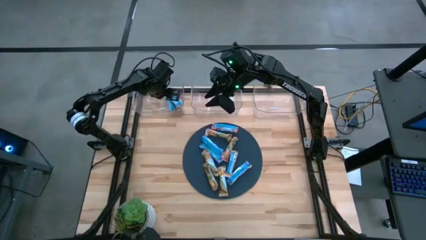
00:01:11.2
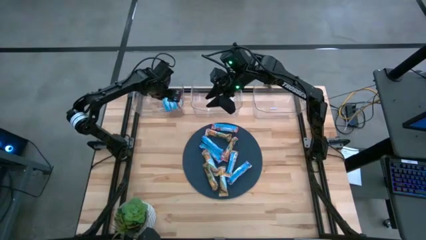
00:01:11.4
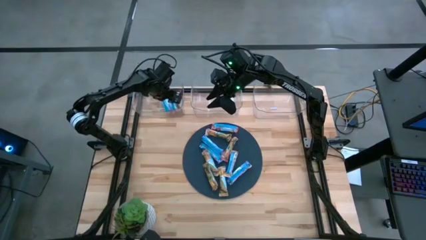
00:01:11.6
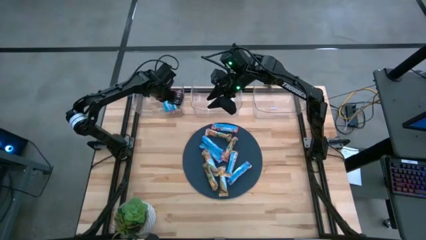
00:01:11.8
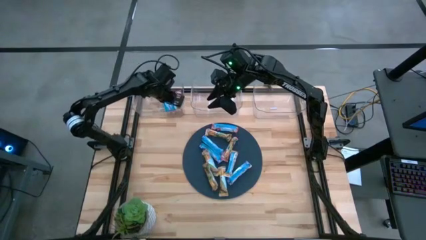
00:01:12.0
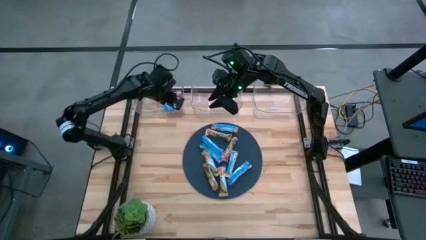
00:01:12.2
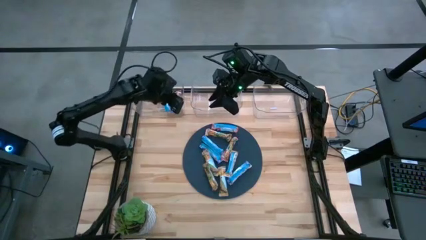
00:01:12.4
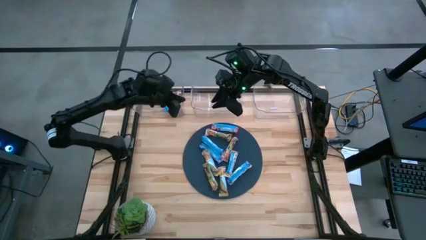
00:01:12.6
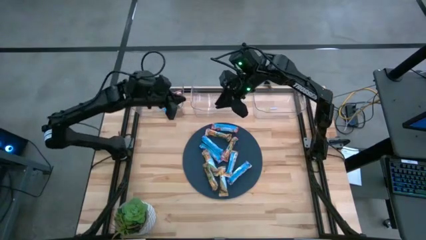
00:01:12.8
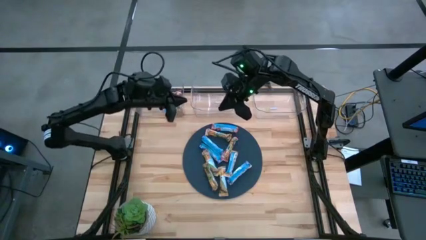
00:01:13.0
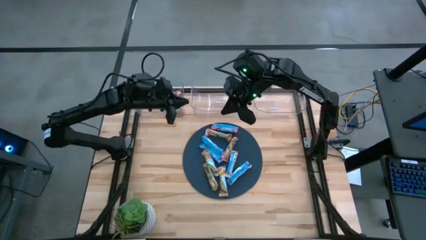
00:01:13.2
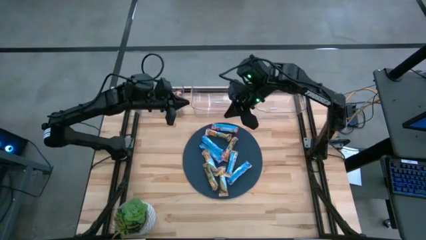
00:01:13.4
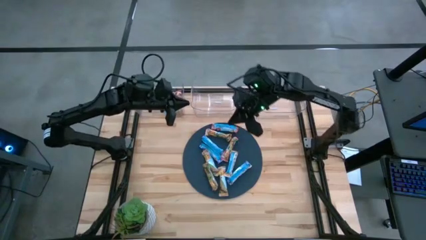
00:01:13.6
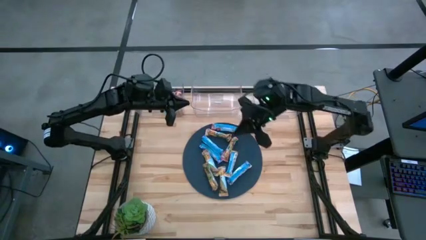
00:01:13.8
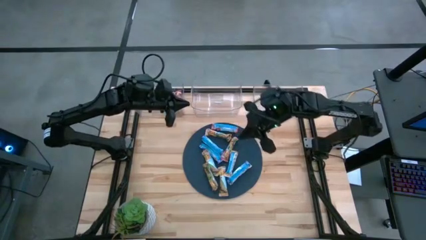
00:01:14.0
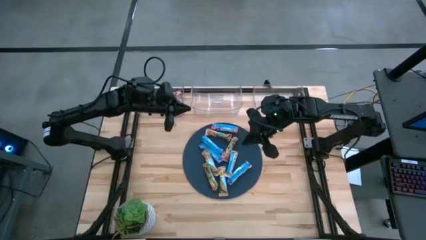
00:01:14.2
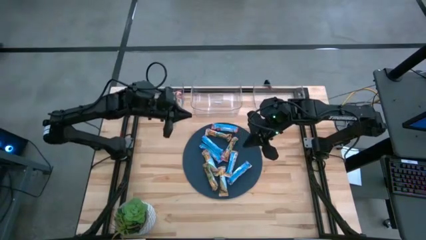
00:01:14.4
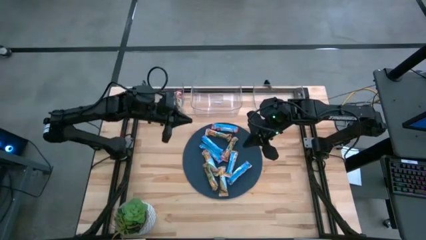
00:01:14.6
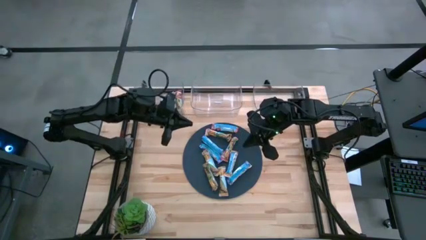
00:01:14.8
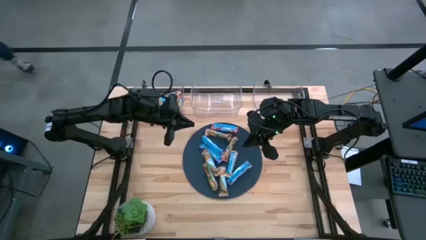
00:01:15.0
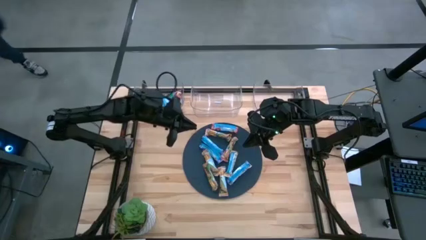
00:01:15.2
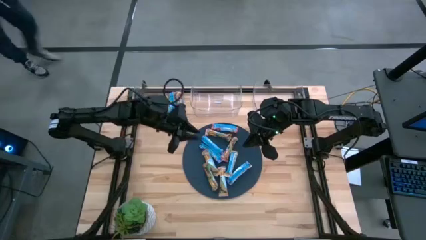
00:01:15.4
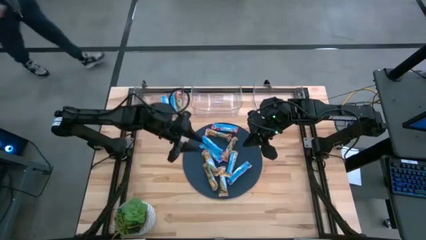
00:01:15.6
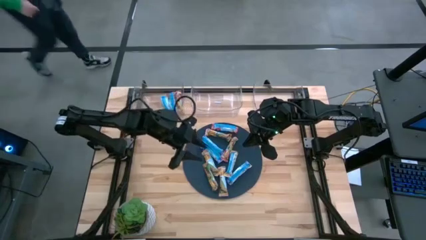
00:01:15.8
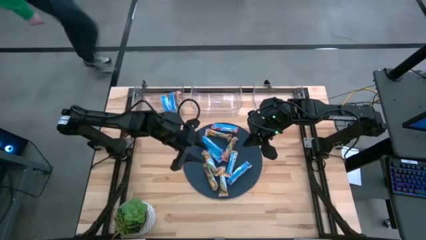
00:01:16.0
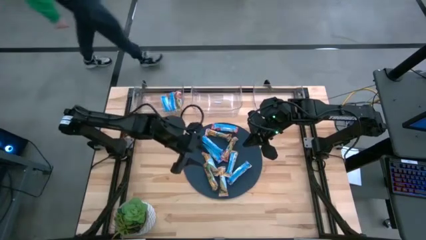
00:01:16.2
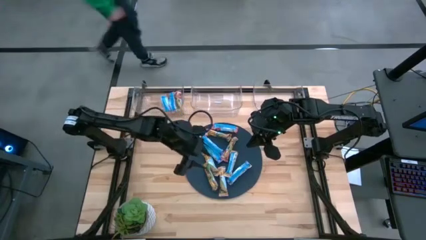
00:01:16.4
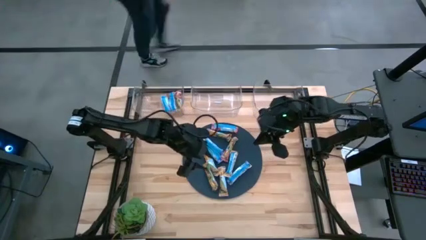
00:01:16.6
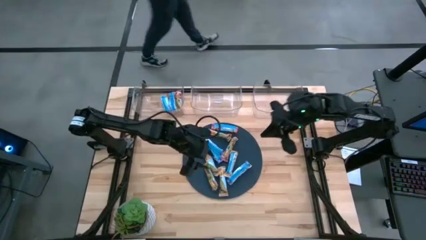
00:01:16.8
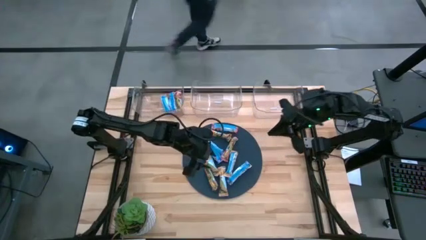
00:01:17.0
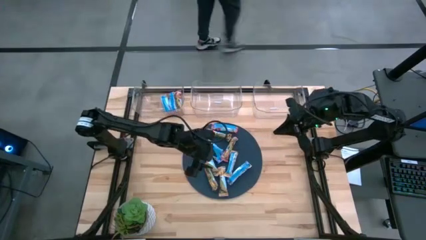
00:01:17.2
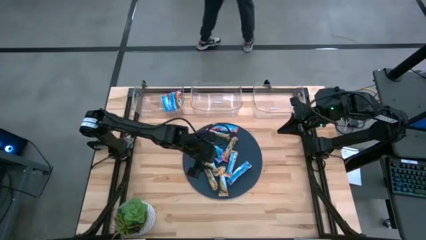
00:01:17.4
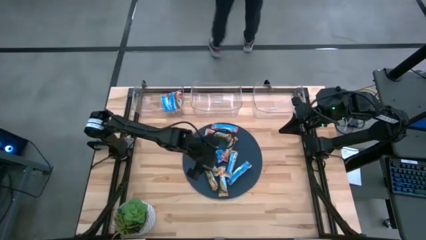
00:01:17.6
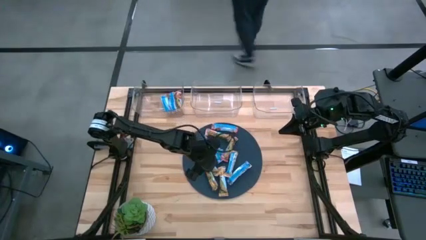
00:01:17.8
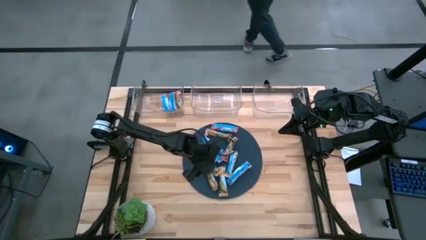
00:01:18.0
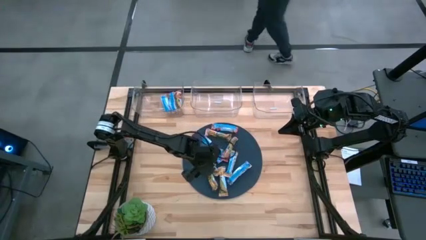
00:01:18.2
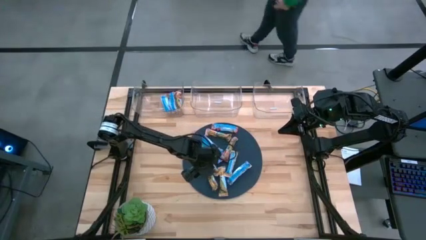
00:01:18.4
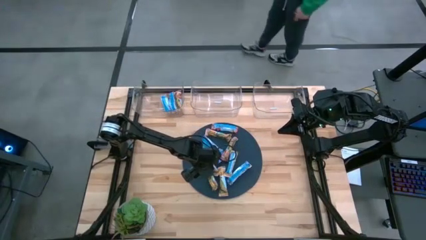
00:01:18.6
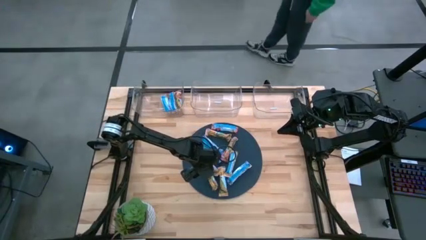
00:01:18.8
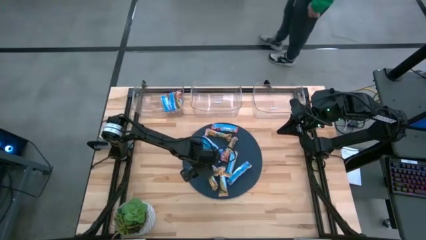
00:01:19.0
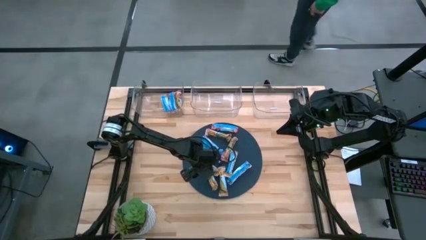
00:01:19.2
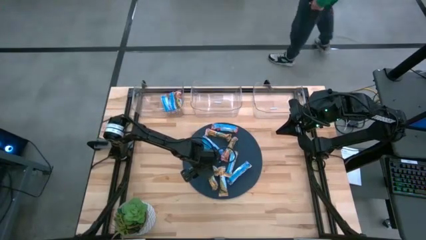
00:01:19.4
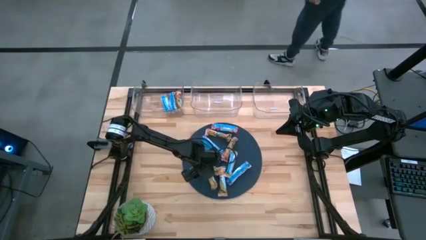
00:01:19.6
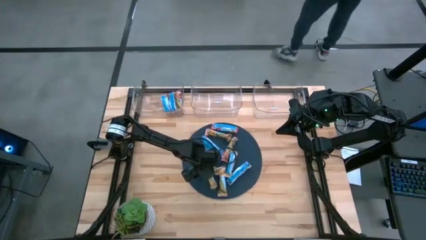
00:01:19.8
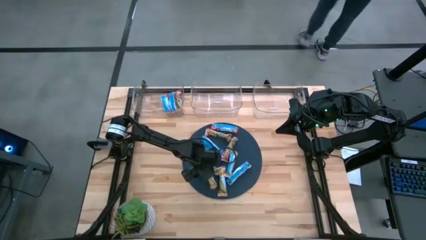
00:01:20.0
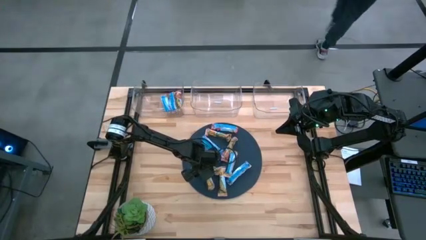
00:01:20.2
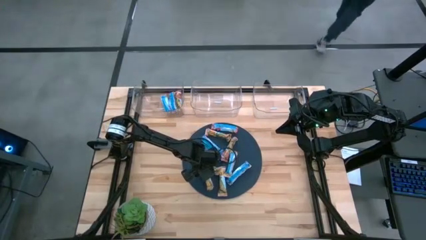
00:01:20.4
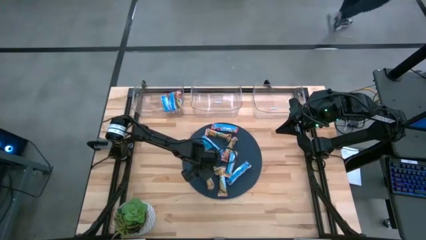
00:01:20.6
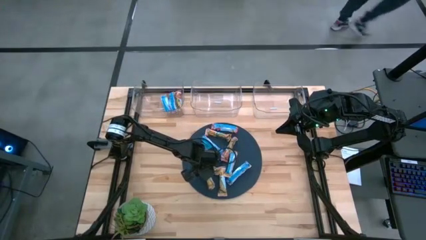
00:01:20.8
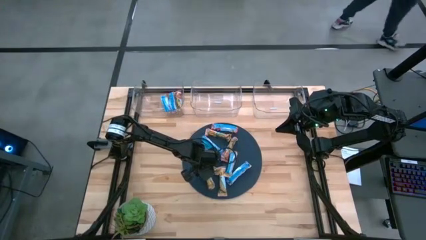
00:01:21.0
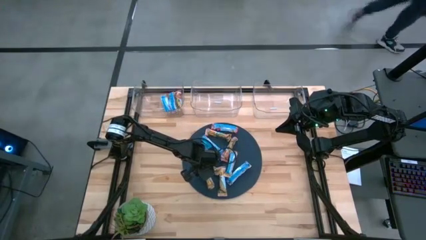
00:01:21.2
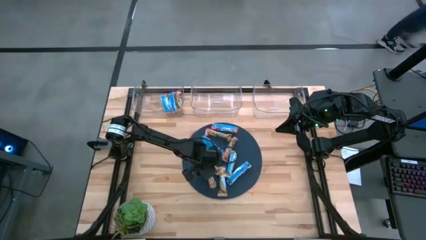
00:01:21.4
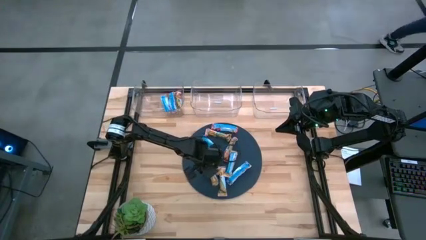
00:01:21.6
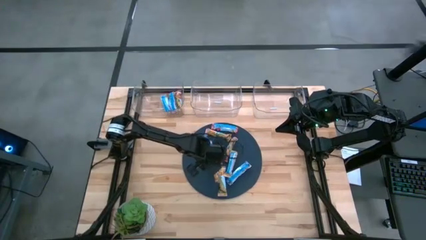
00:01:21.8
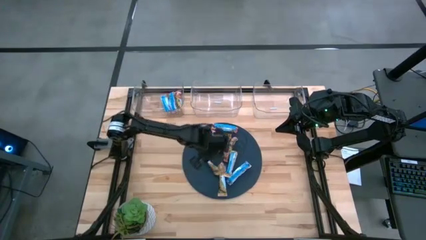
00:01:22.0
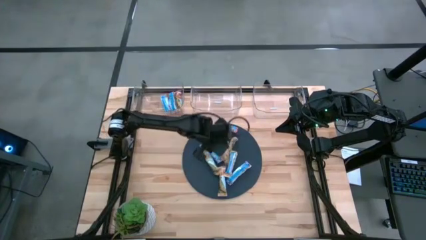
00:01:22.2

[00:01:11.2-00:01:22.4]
Task: Pick and place Granola Bars by type
Put the yellow granola bar into the right transparent bin

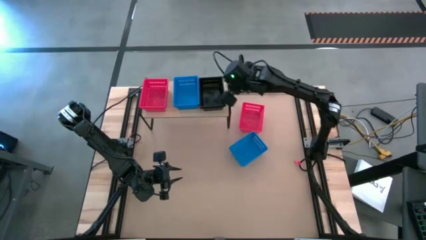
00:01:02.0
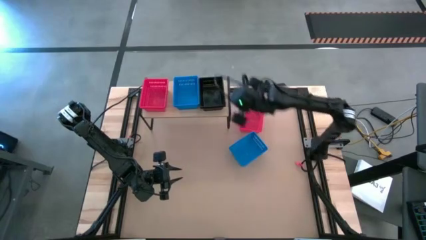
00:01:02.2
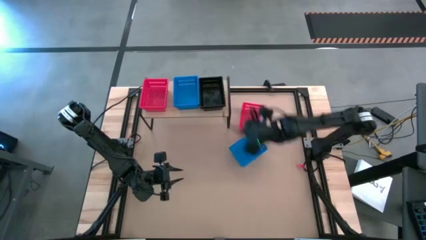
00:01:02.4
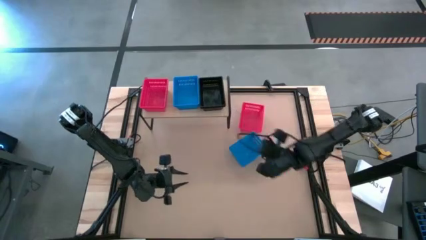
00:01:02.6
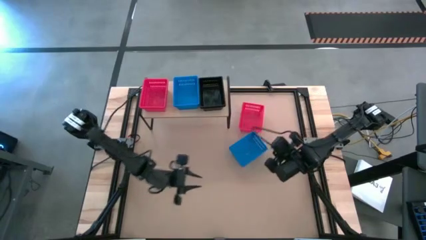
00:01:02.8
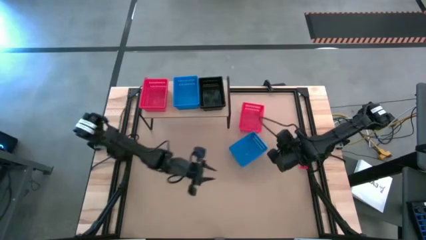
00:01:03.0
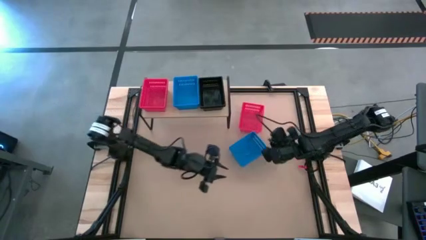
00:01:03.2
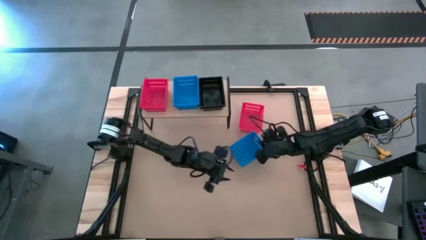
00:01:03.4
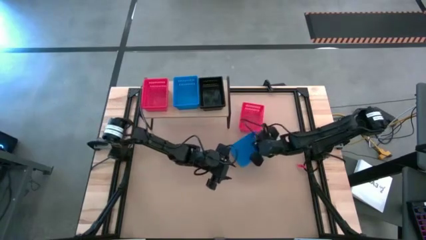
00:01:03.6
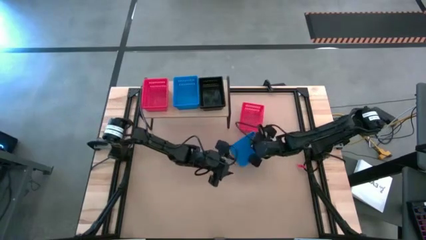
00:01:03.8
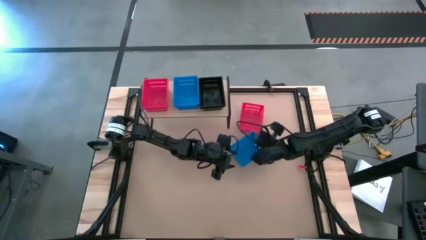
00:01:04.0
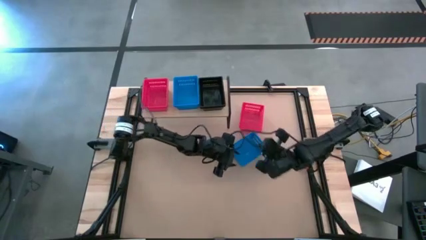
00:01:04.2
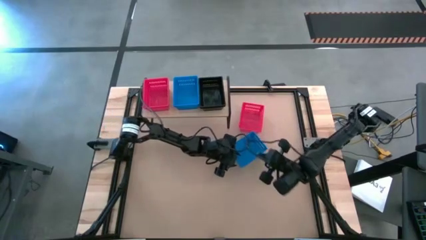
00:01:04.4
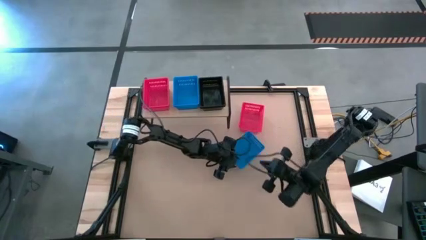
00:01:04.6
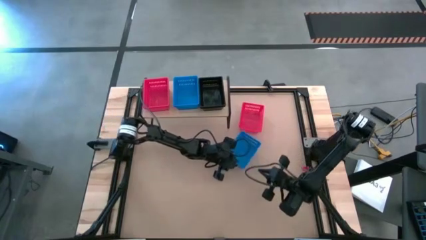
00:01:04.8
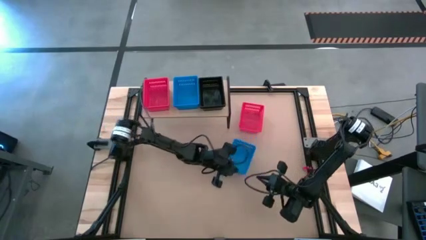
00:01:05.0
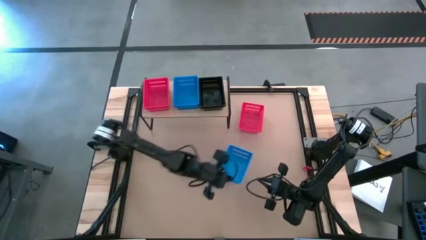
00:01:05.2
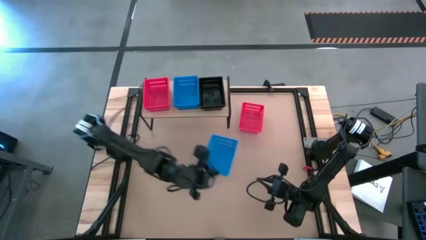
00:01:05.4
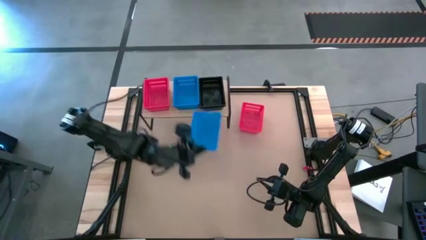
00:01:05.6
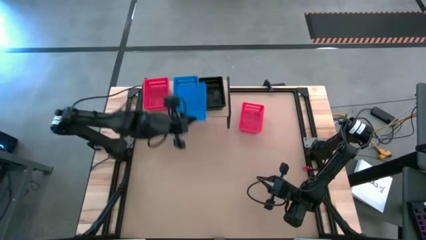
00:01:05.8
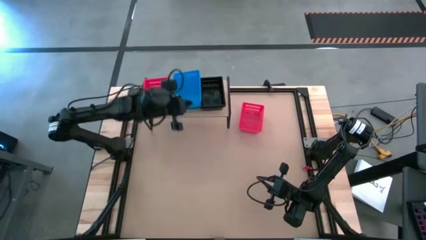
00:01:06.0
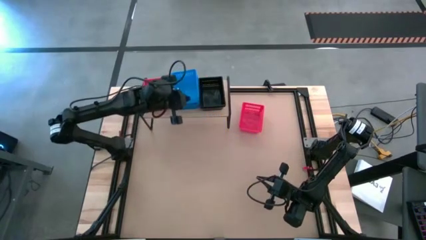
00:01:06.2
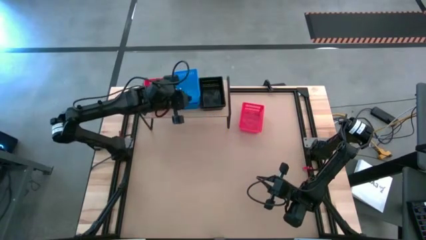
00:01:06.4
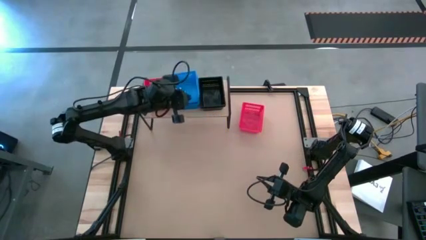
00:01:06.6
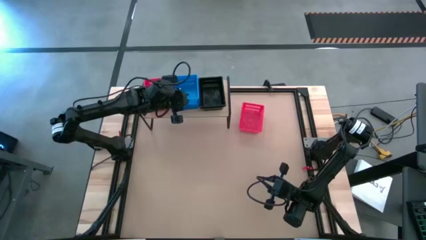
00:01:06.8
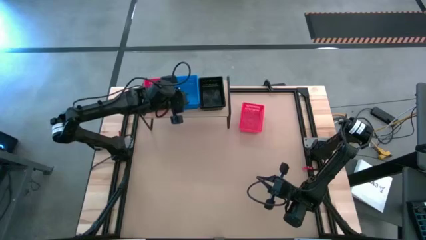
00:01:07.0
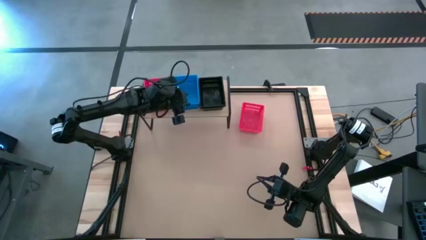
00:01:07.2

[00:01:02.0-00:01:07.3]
Task: Stack baskets on shelf by color
Stack the blue bin on top of the blue bin on the shelf
